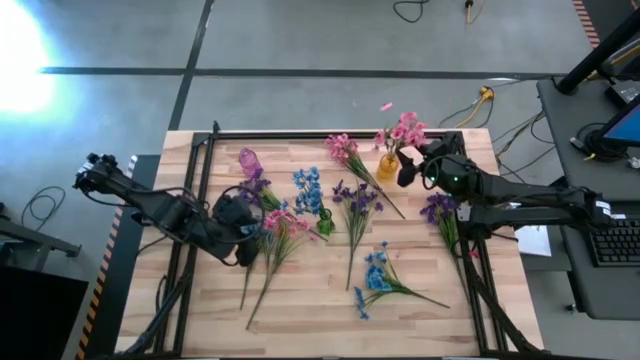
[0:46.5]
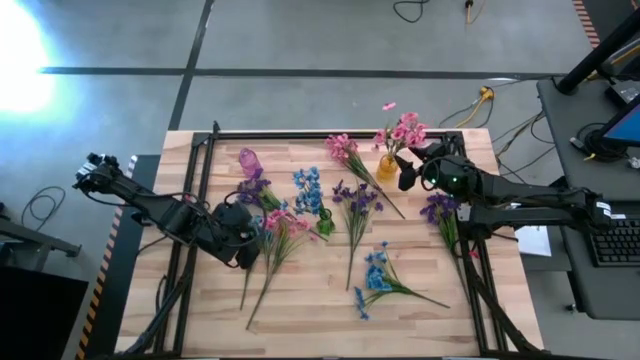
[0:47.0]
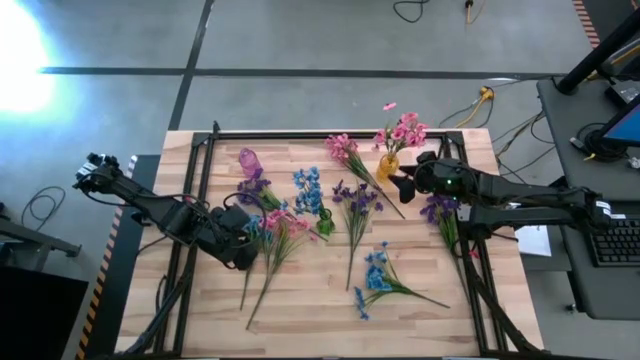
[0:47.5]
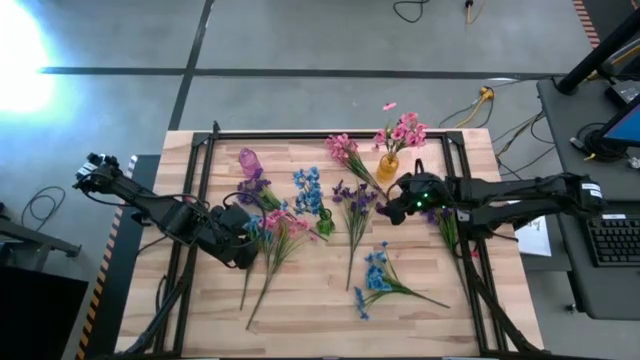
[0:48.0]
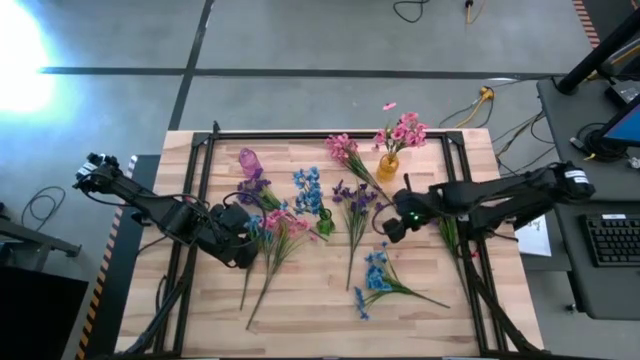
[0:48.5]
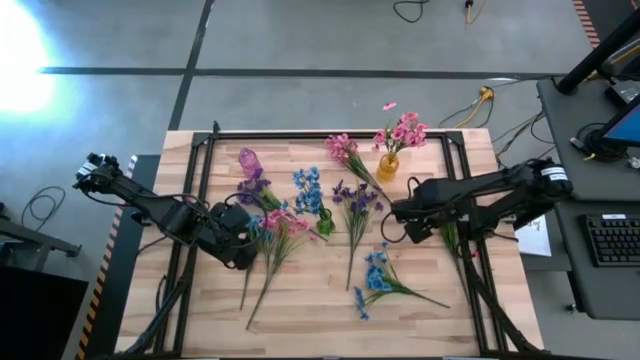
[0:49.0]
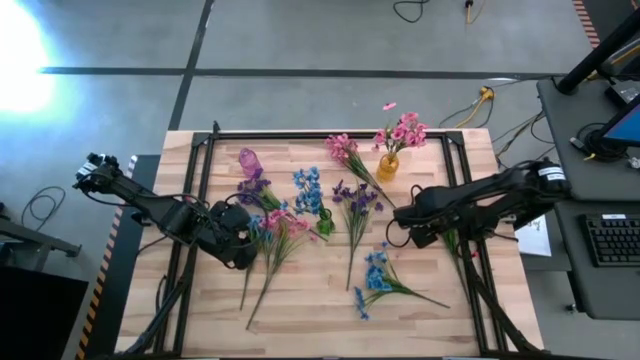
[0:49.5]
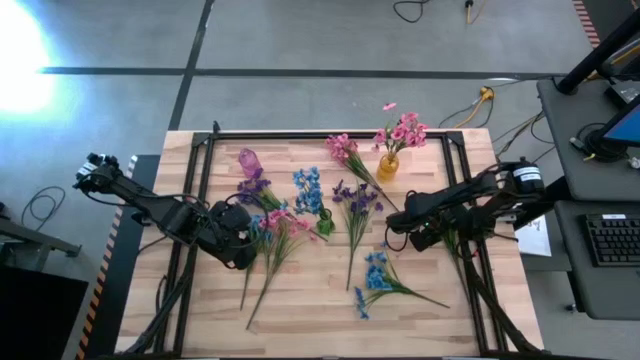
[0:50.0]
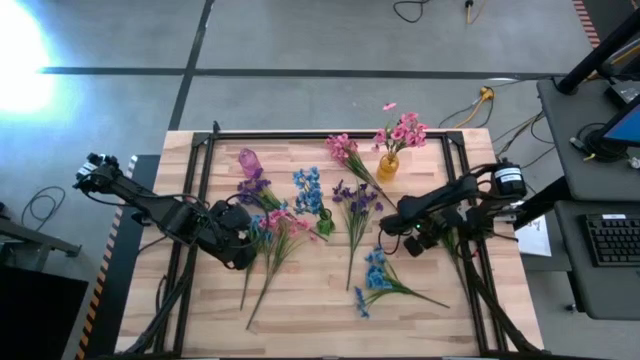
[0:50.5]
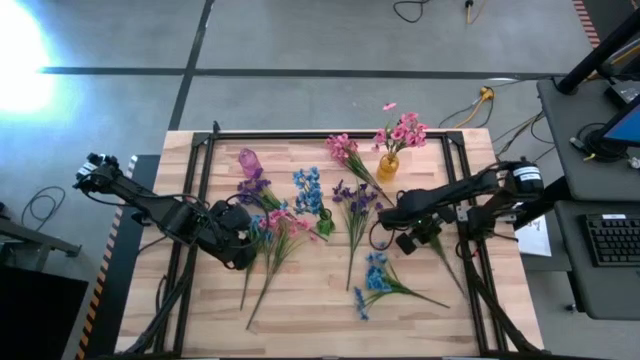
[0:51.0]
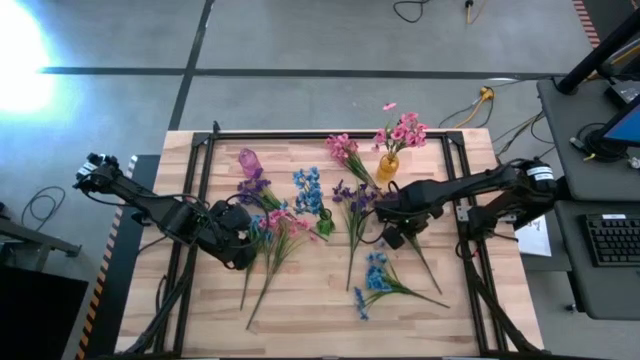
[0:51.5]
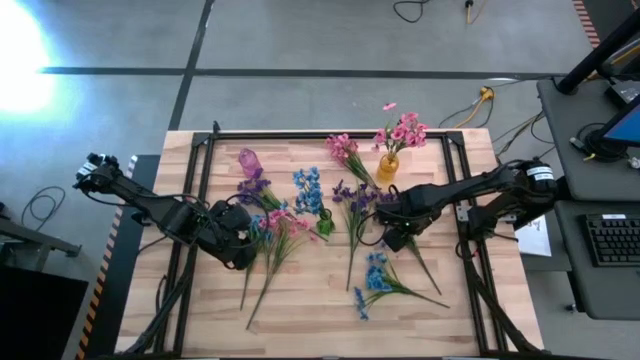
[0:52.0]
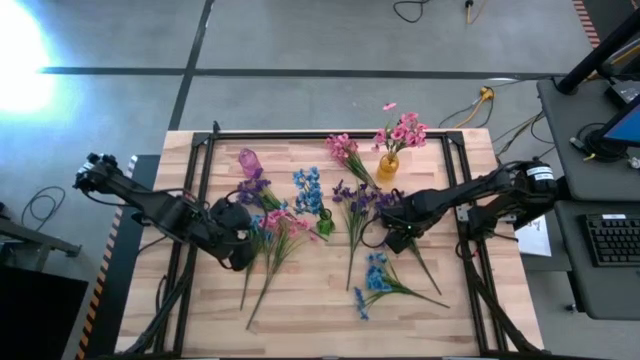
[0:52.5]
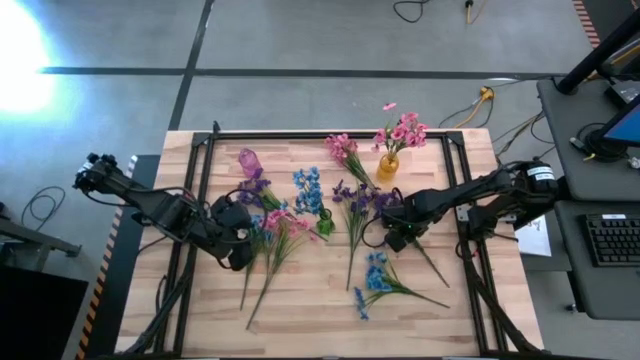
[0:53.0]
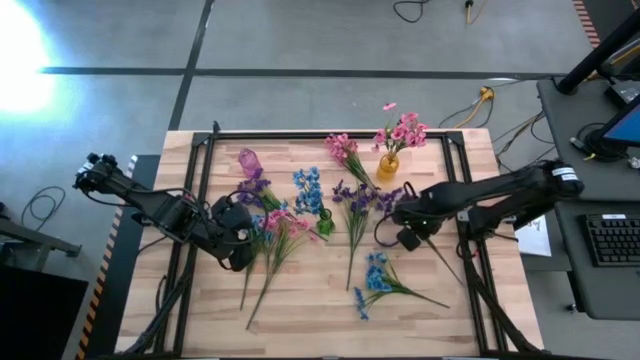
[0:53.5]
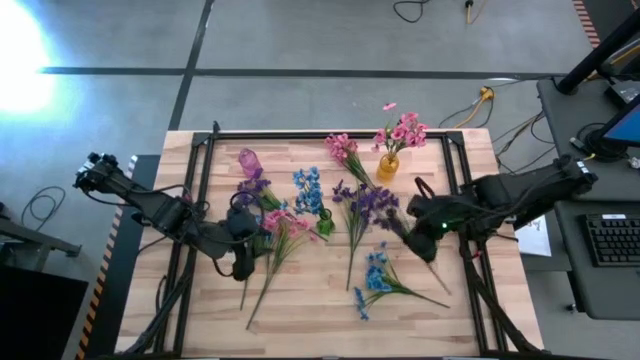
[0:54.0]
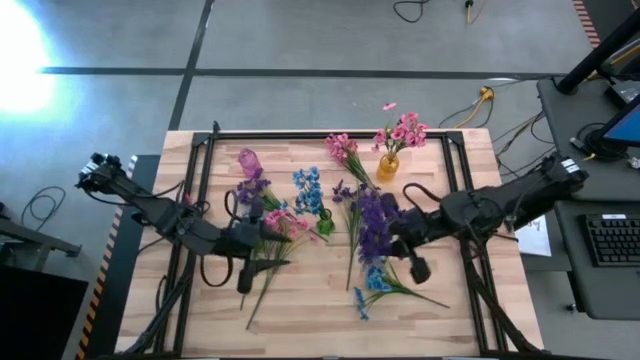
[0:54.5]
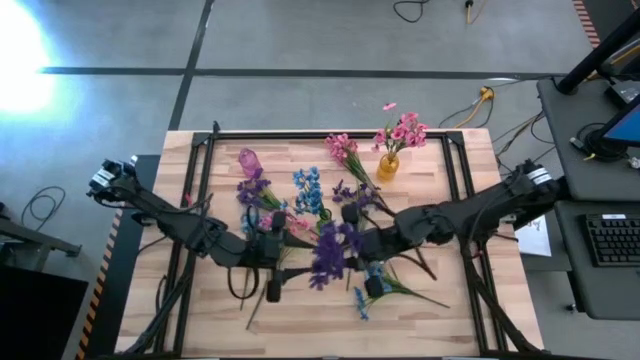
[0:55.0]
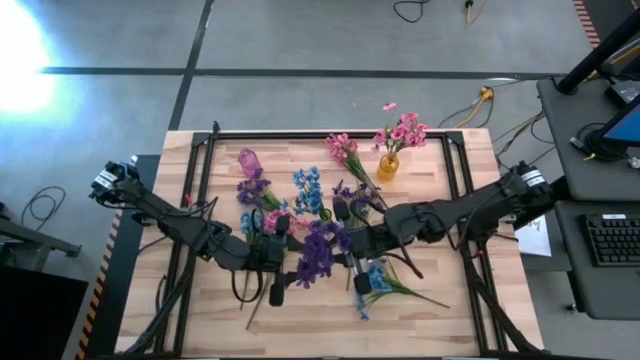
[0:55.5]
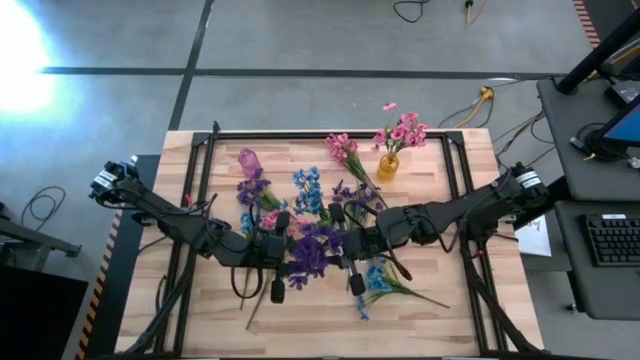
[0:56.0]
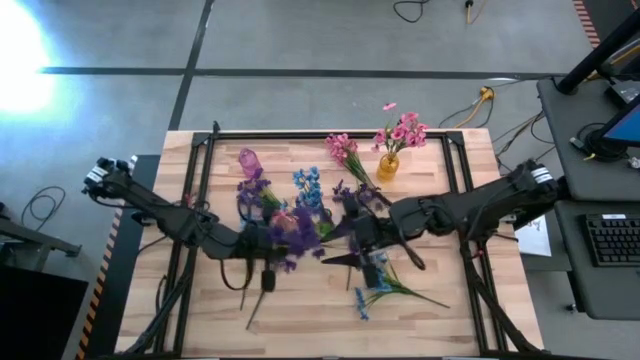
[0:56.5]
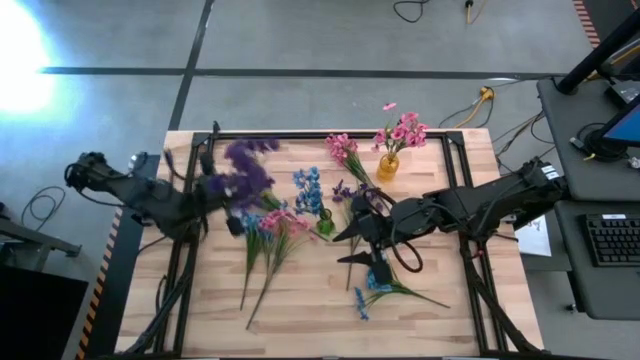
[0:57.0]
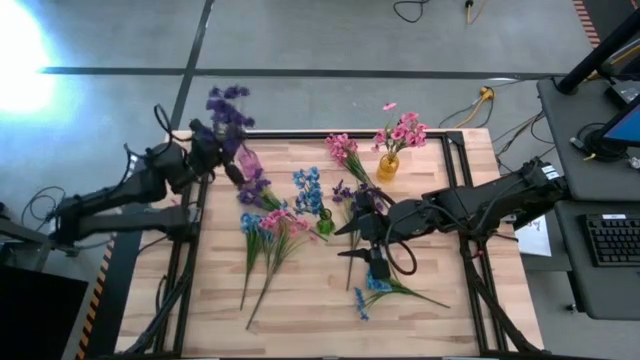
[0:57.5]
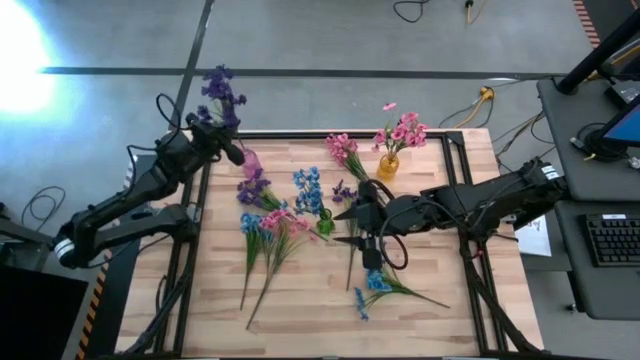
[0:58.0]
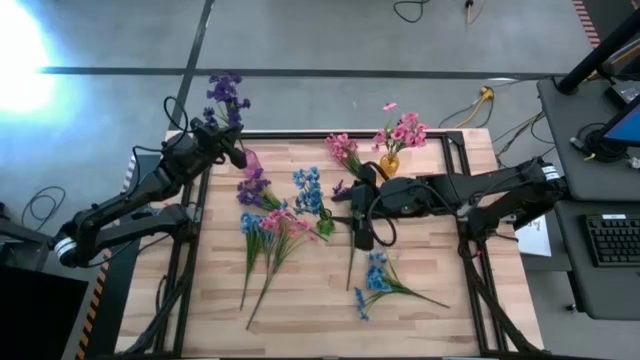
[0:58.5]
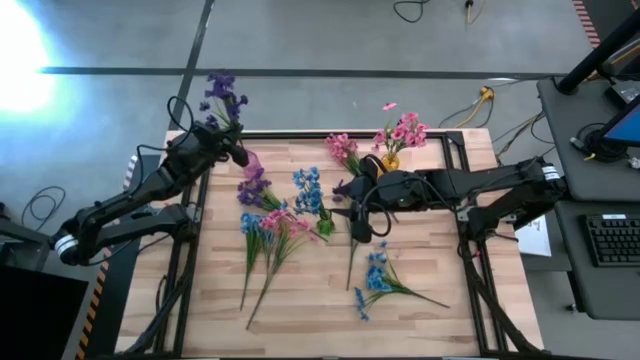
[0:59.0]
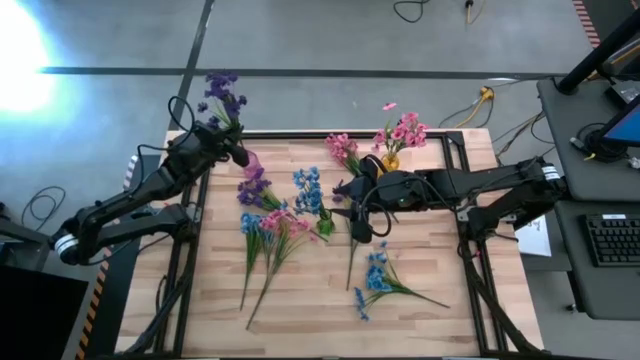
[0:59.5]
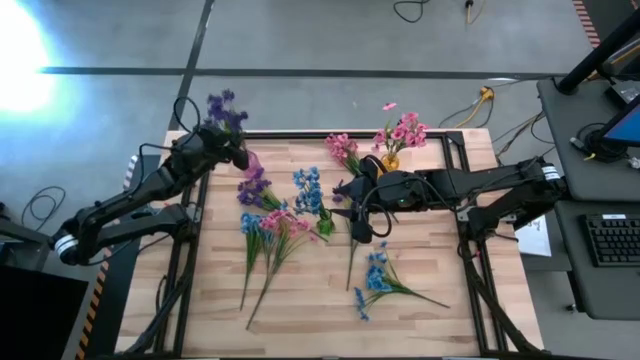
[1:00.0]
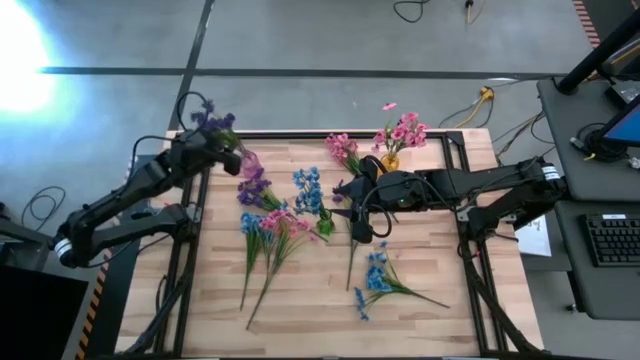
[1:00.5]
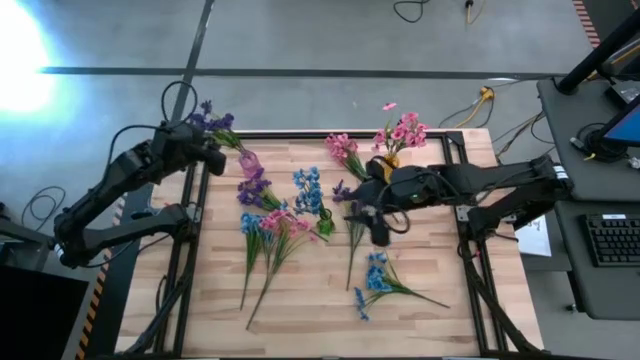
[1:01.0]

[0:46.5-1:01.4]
Task: Sort flowers into vase by color
Put the right violet flowers into the violet vase

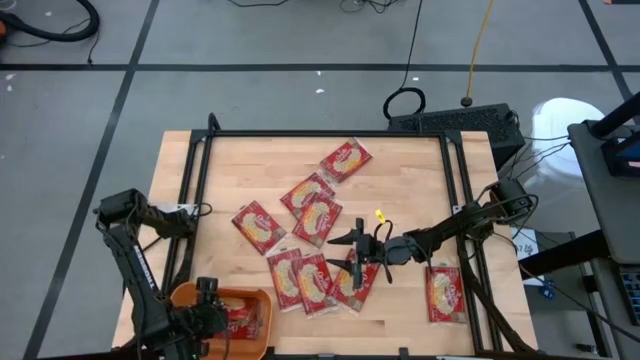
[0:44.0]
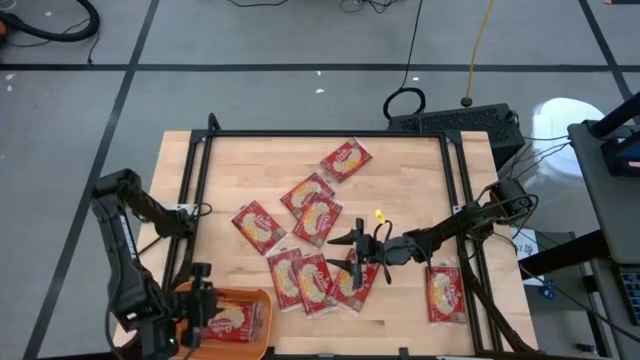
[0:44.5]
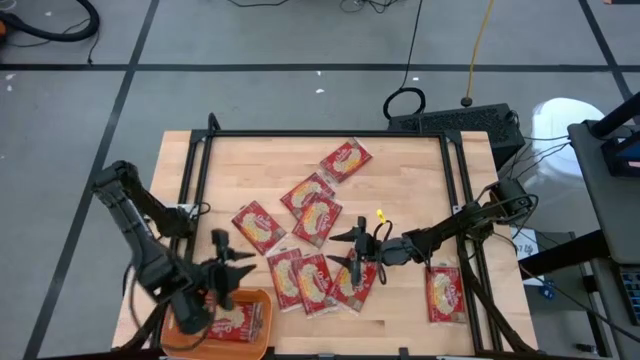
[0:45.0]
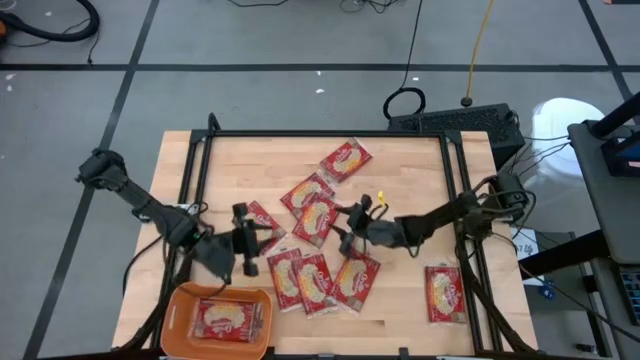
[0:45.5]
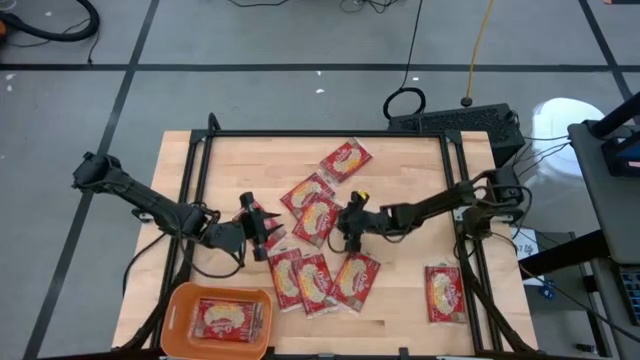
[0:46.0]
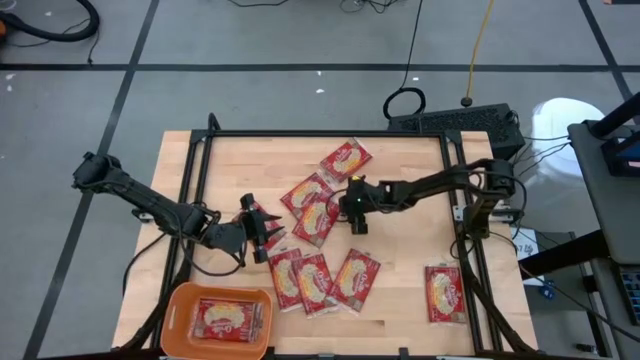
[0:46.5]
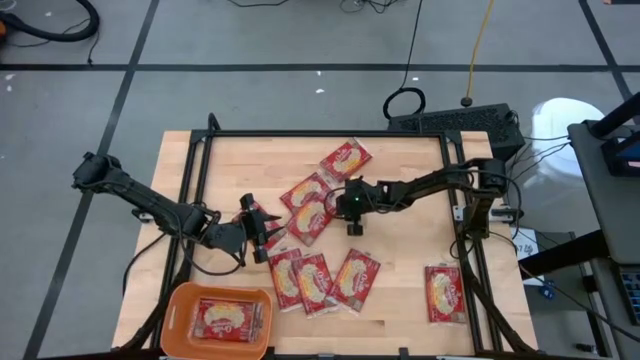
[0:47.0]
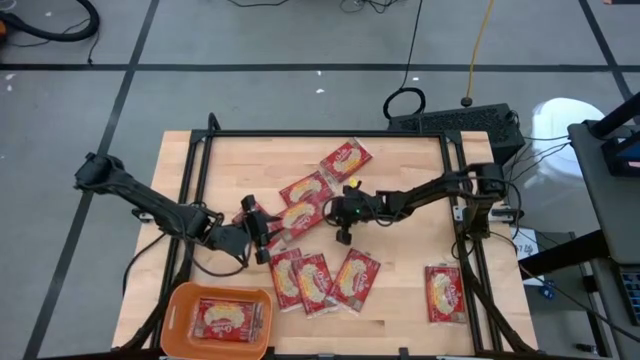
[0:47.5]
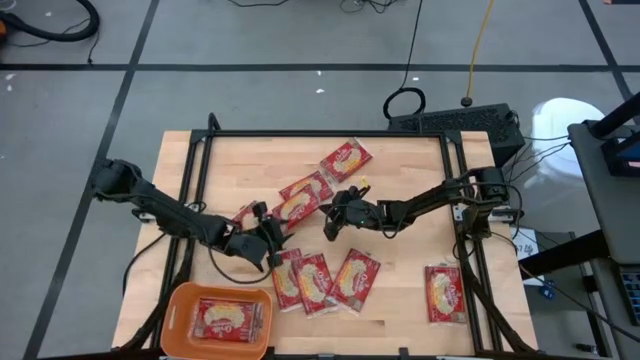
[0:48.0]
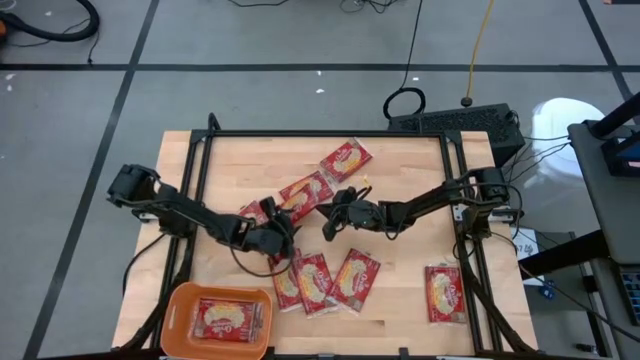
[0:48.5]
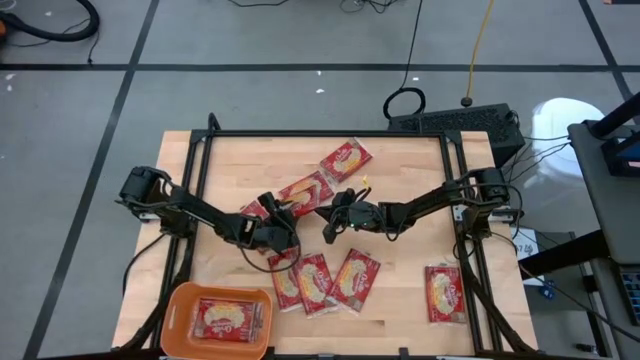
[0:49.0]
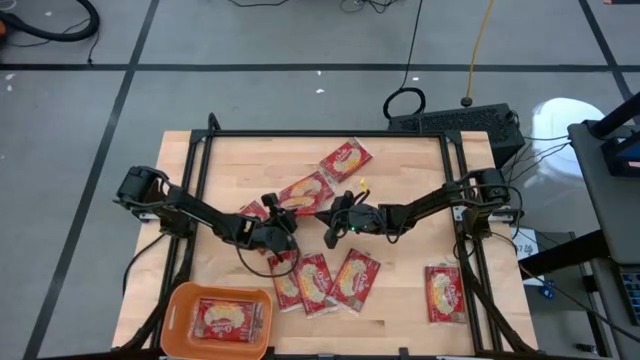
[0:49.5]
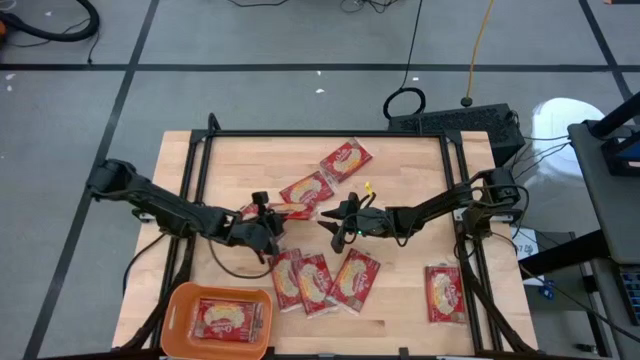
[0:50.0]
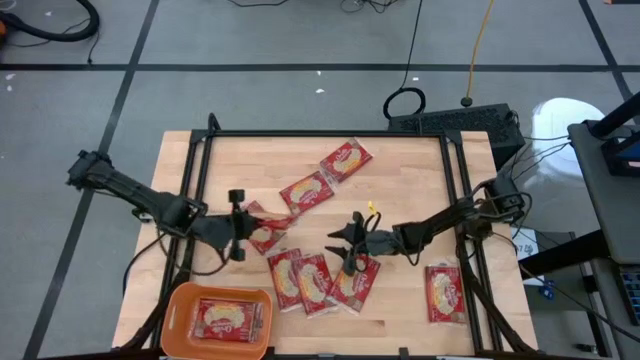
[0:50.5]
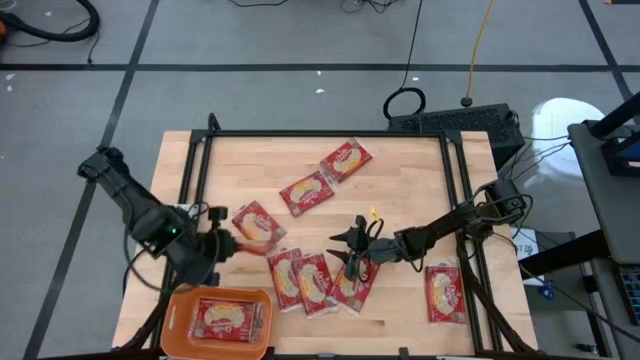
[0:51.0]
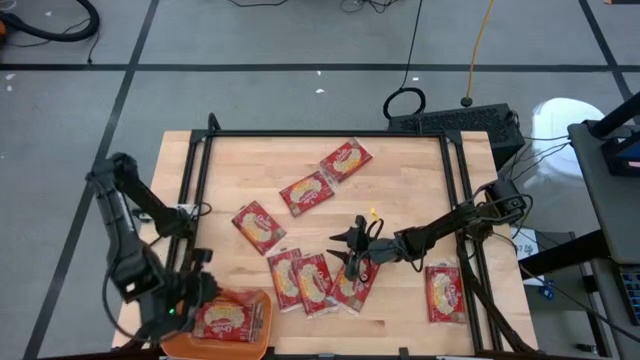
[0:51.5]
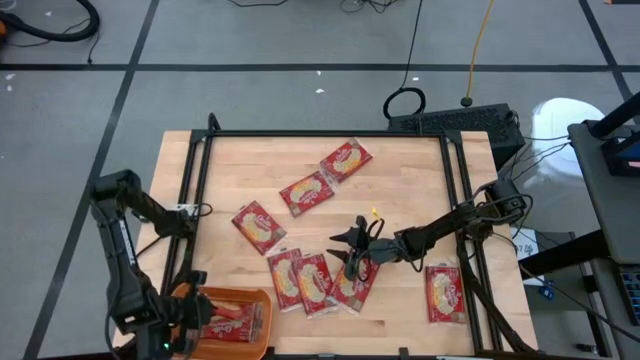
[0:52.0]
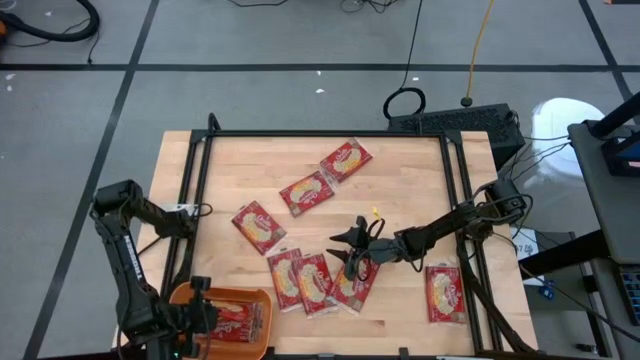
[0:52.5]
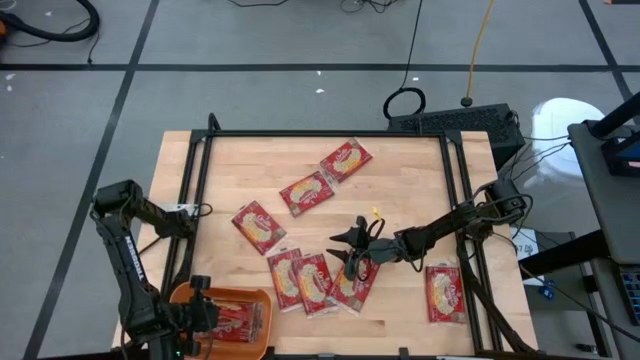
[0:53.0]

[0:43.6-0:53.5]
Task: Sort popcorn bags into baskets
Put the popcorn bag into the orange bin
